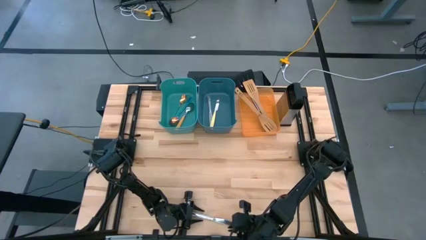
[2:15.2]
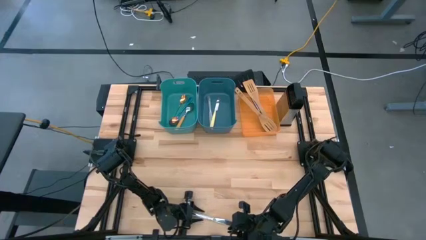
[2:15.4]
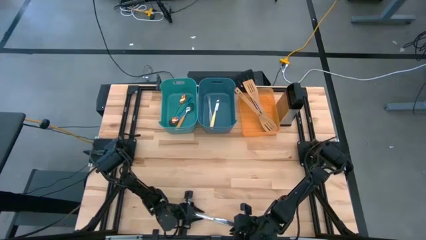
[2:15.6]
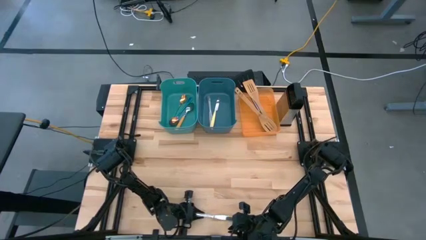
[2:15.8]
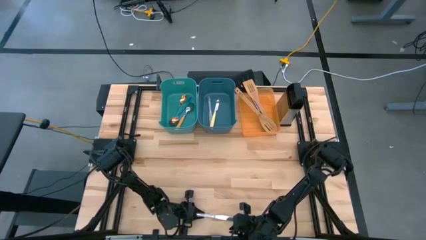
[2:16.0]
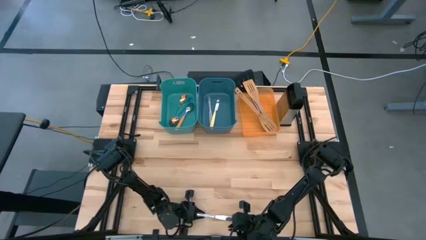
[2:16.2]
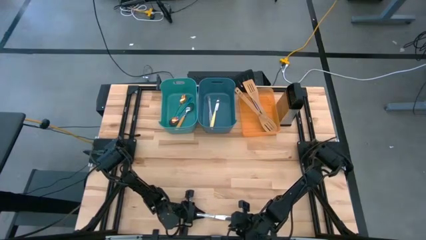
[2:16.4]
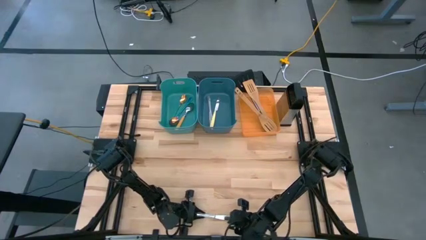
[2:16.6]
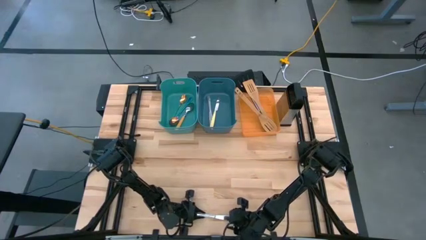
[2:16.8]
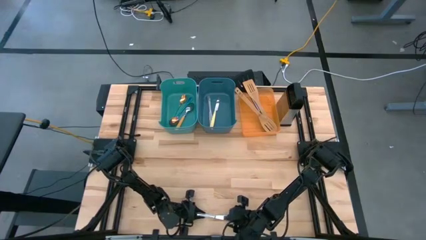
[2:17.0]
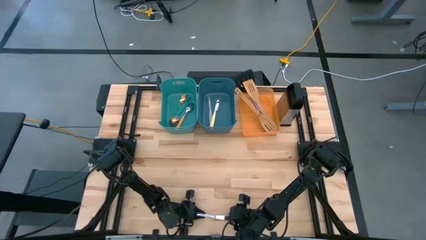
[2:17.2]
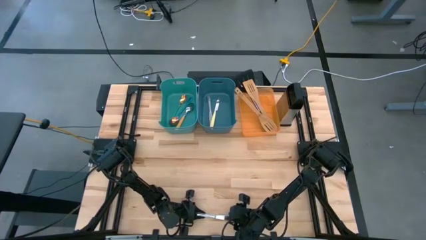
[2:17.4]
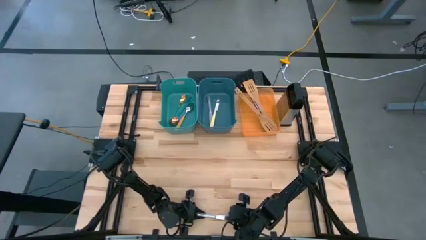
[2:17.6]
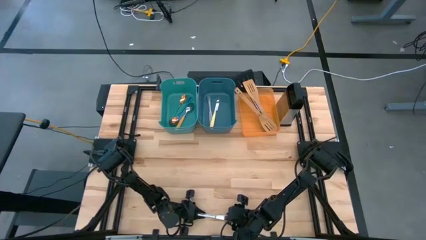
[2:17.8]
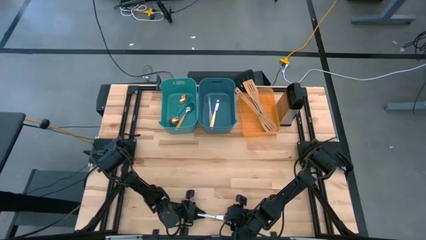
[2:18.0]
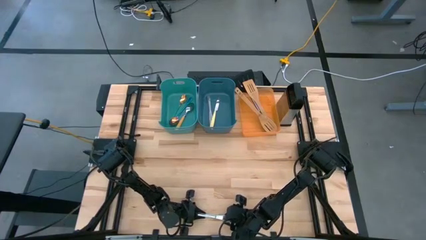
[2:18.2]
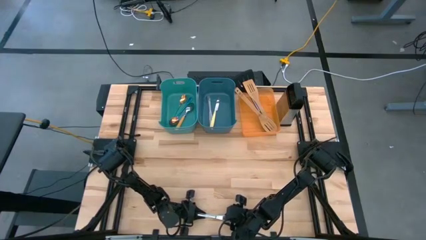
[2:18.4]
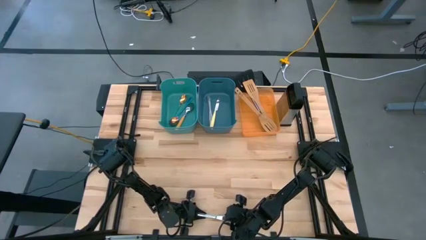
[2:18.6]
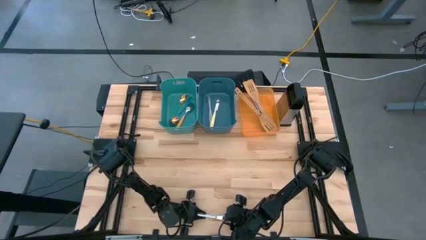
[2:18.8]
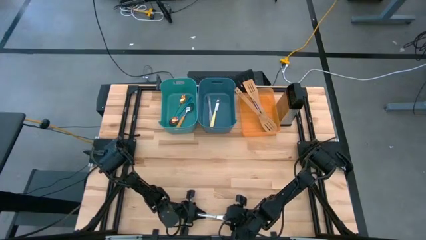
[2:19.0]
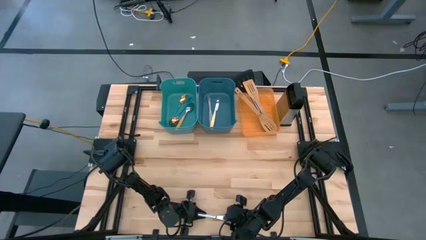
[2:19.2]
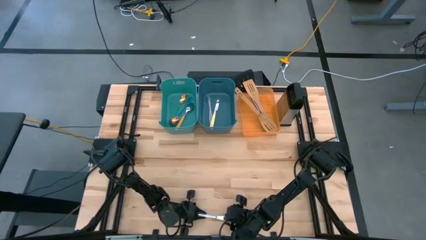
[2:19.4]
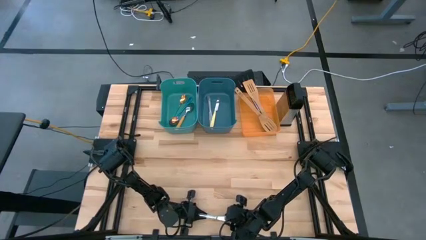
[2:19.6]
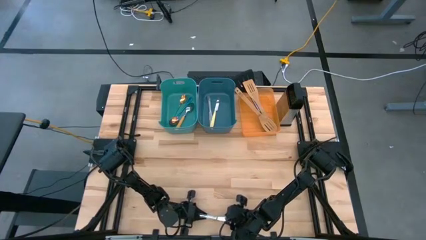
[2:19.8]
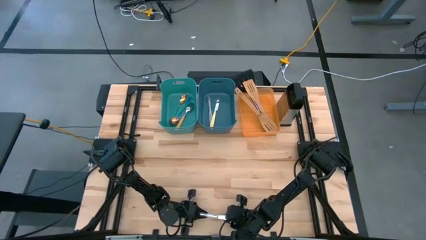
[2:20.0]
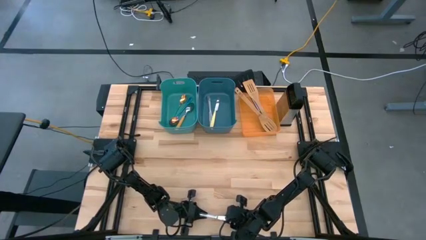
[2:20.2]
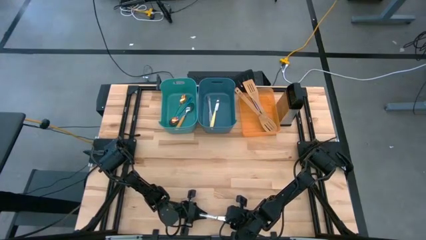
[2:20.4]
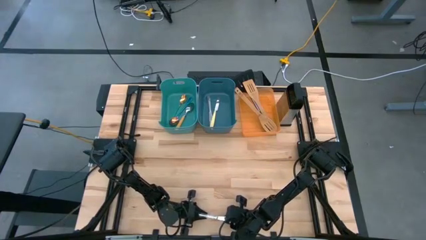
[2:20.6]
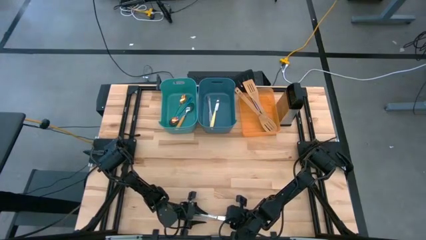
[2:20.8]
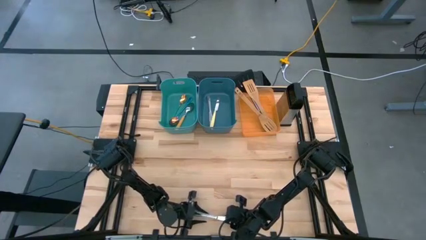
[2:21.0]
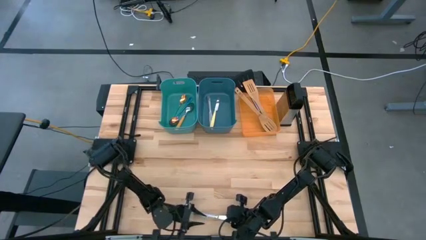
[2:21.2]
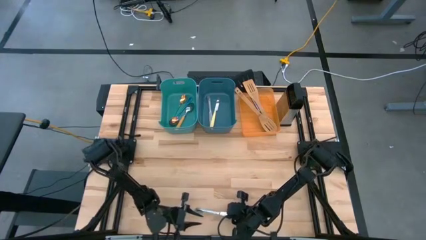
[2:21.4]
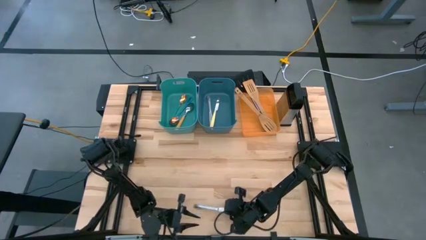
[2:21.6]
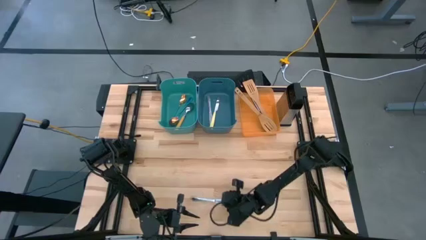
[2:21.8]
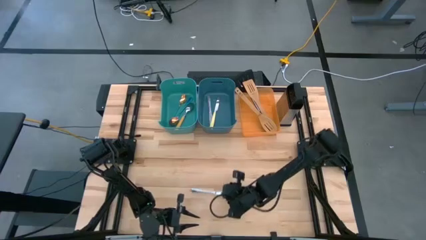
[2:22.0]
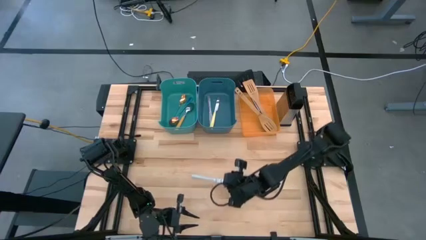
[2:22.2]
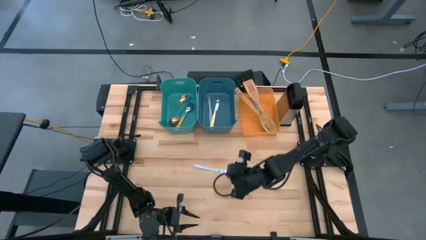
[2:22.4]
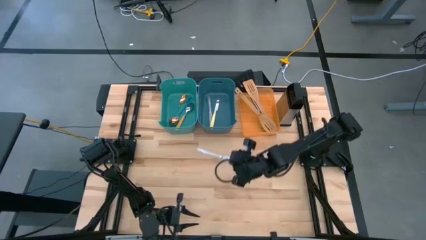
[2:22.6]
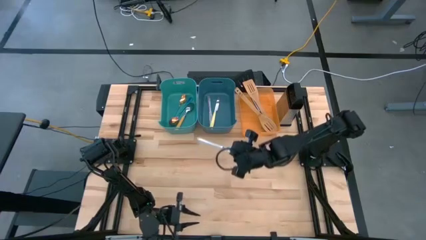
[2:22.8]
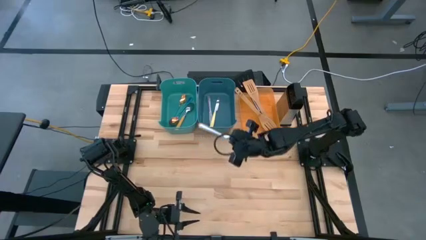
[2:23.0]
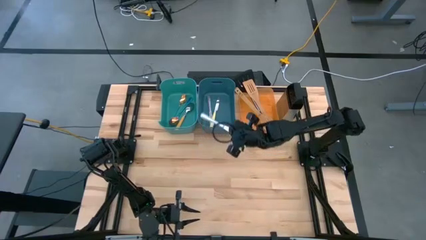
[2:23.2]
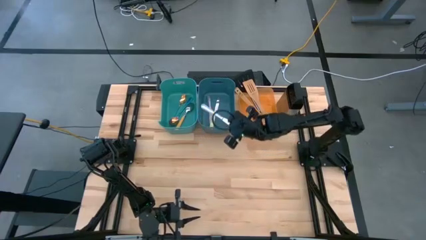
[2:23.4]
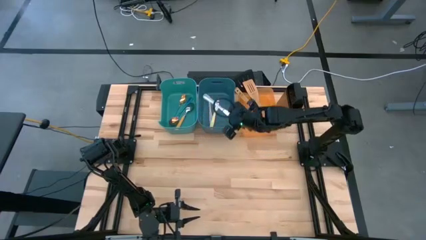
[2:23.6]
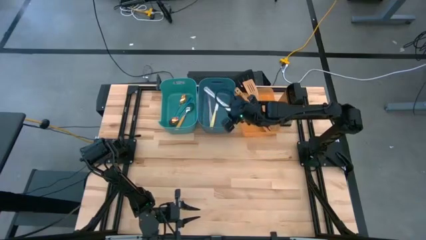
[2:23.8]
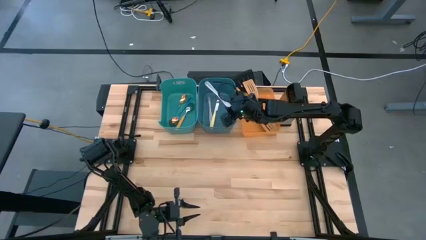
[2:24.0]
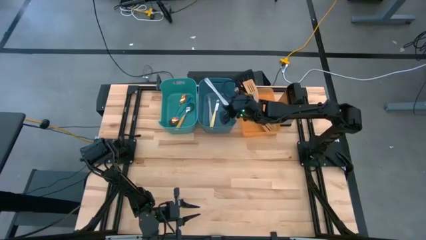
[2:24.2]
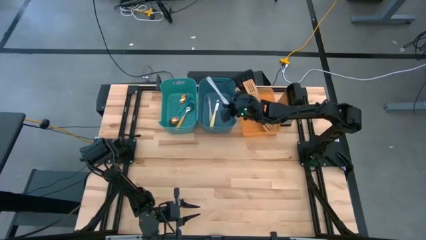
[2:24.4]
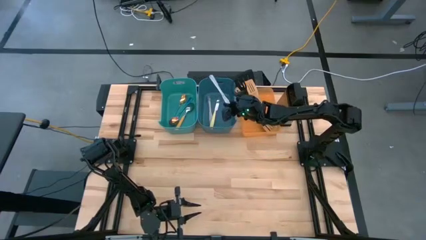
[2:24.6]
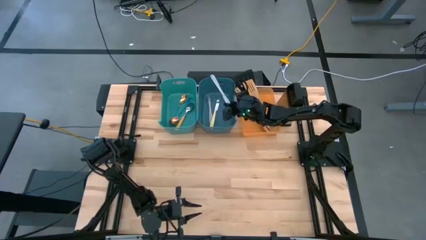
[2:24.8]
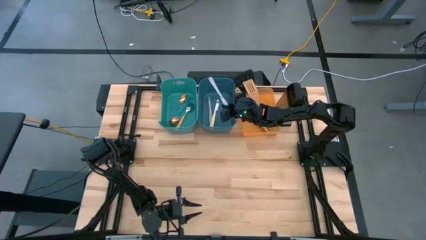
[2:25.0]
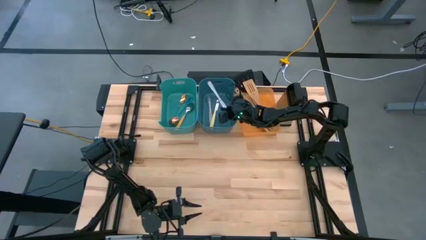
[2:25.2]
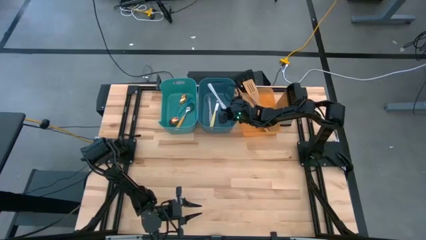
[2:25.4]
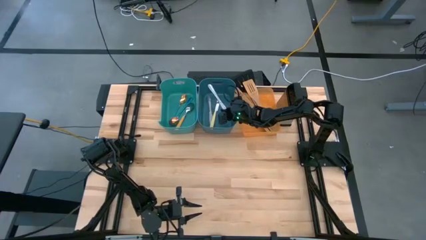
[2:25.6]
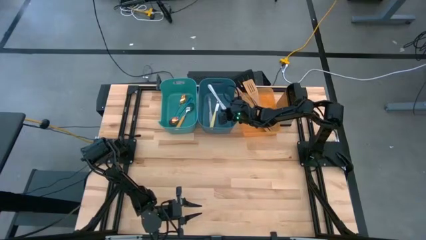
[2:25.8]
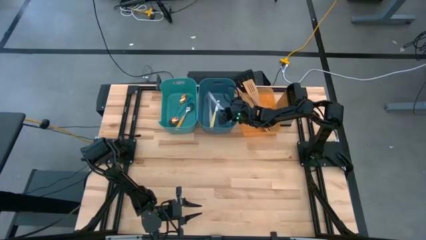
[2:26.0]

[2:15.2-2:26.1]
Task: Pick & Place Kitchen Items
Put the silver table knife into the blue bin

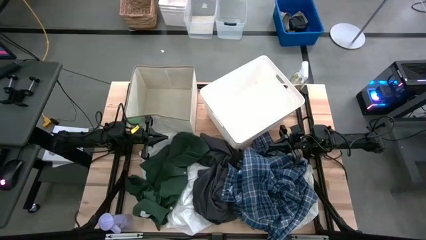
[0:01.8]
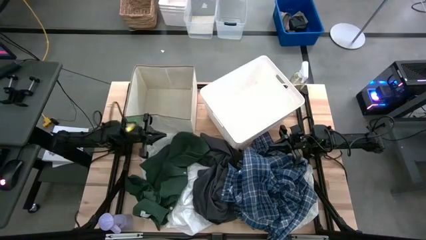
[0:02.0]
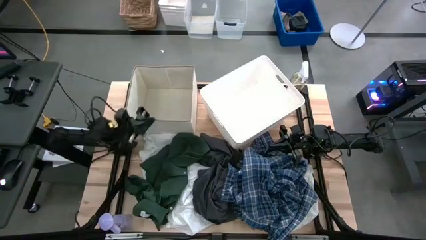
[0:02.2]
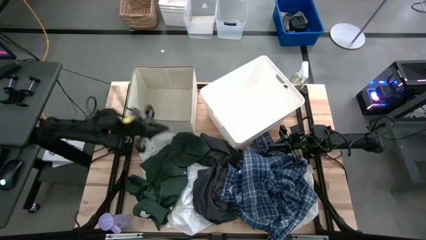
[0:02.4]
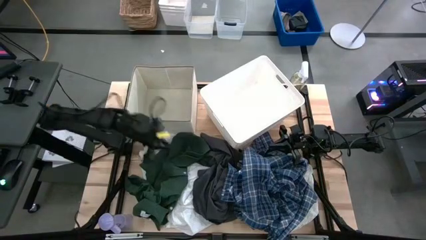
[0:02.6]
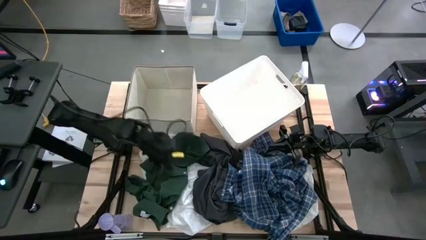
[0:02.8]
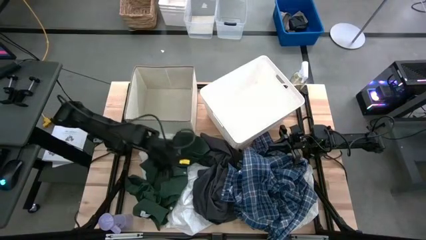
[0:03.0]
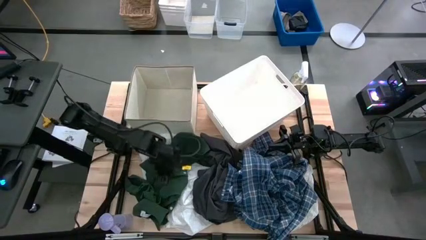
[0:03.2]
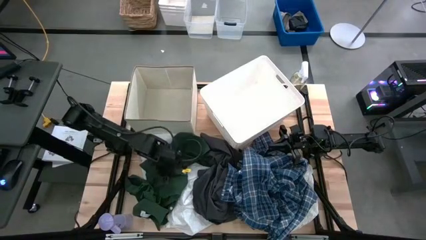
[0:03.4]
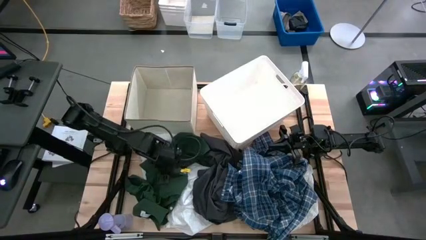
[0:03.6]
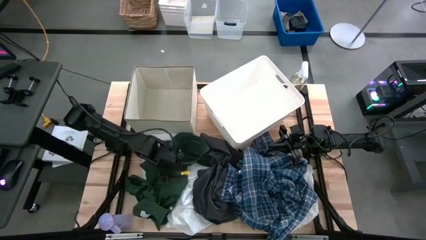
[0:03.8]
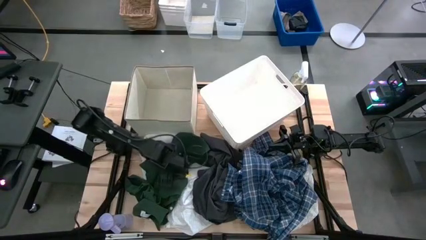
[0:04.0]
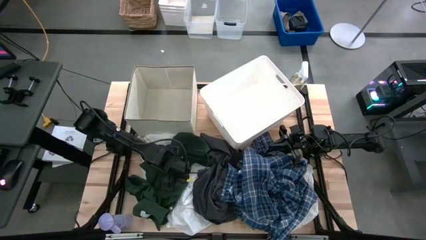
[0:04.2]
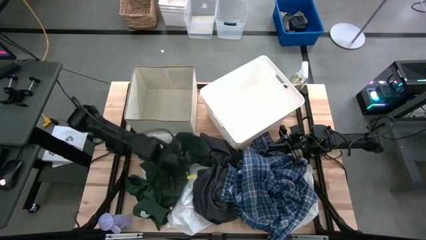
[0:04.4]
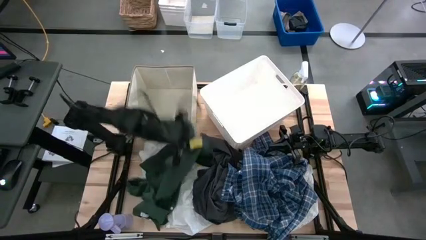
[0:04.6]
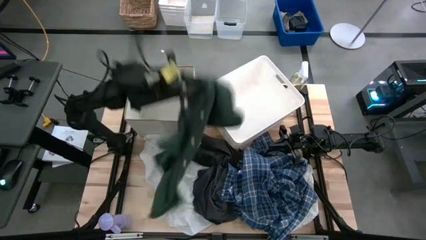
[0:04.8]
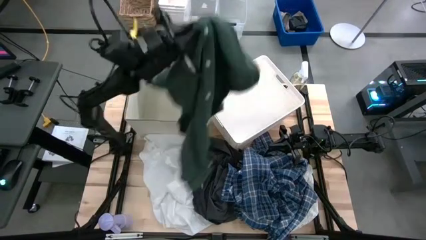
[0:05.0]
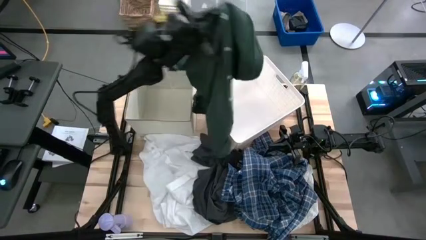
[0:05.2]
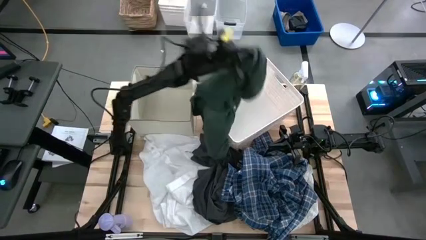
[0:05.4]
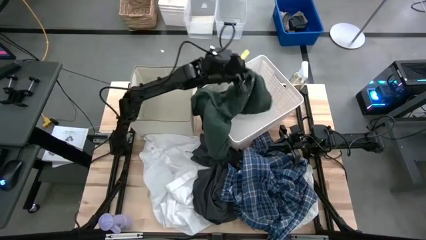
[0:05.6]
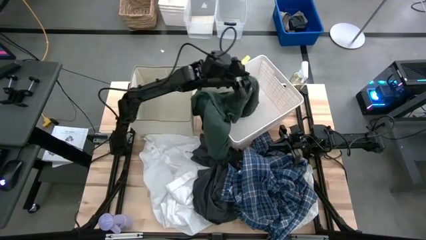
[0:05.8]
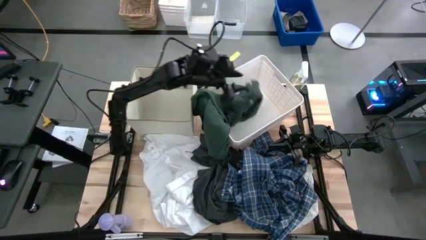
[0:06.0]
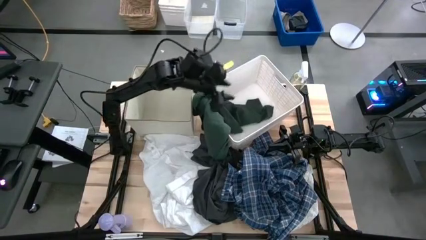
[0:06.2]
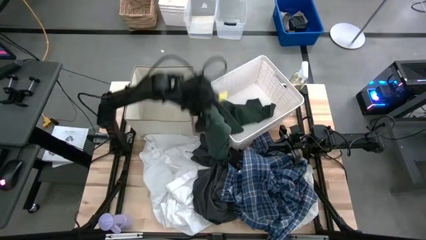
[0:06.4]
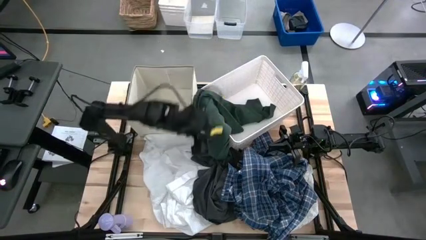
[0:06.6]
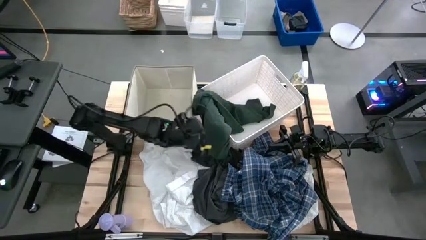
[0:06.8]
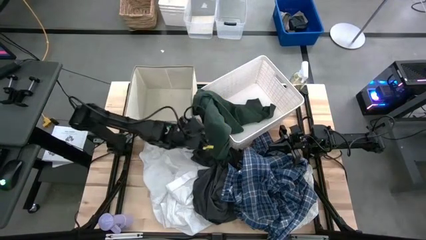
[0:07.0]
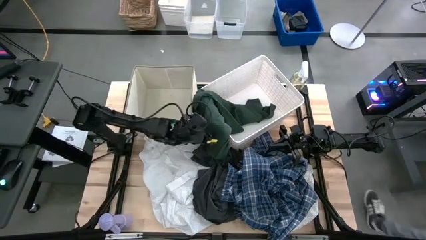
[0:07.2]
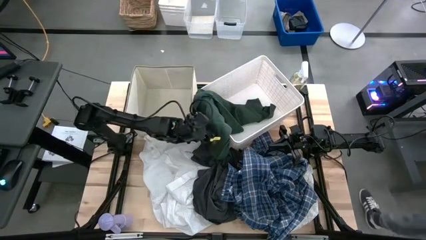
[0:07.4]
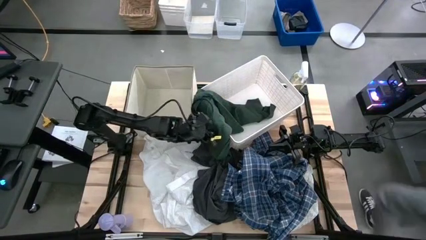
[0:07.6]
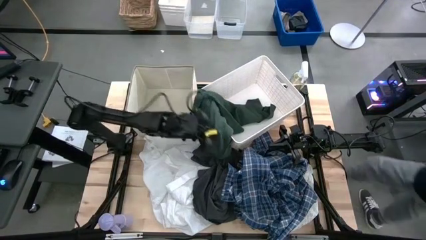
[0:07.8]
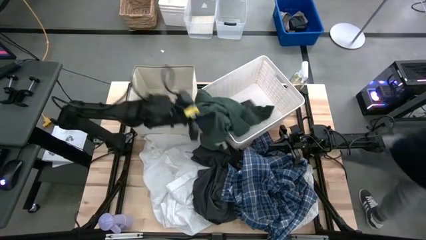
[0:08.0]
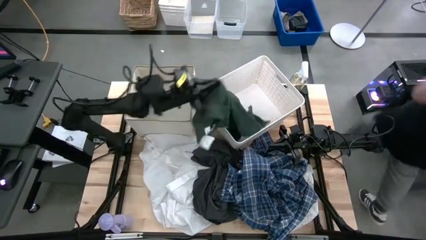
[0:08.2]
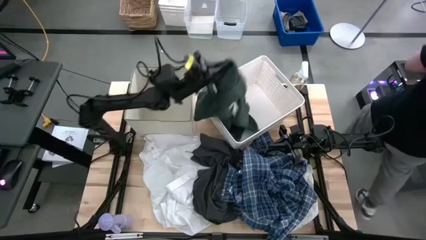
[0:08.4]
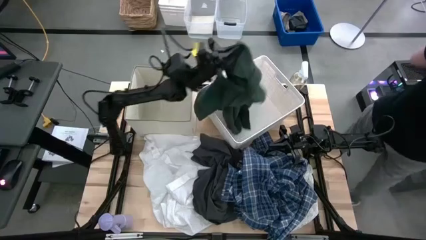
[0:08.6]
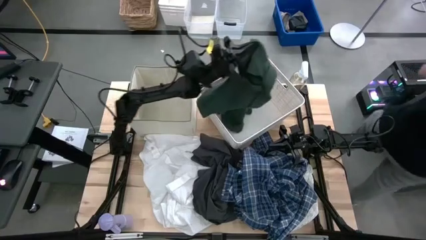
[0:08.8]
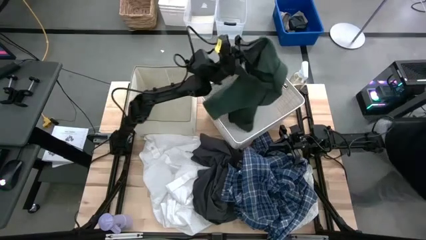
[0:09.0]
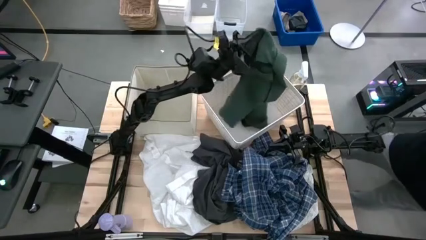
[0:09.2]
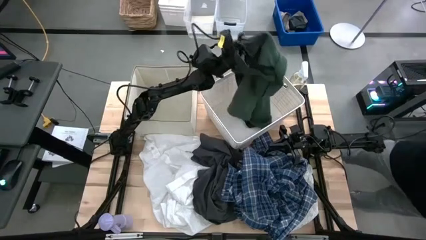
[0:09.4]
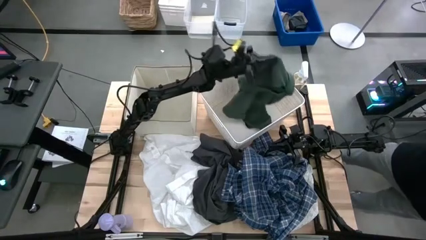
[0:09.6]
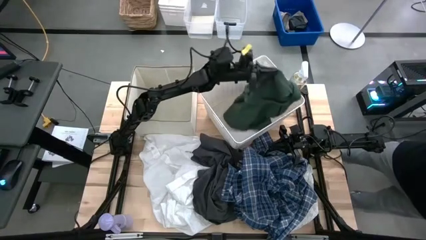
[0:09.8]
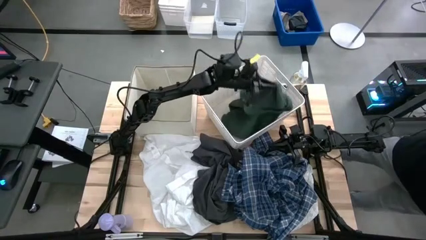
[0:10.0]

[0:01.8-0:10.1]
Task: Sort clothes
Put the green shirt into the white bin
